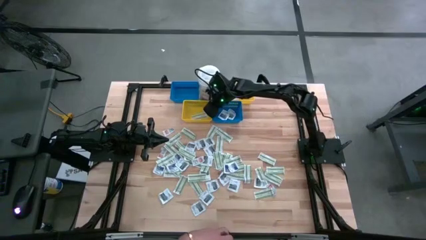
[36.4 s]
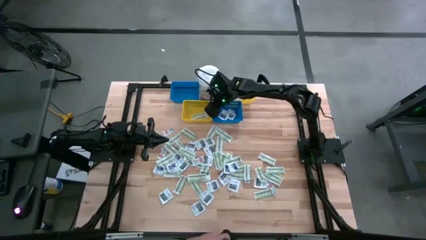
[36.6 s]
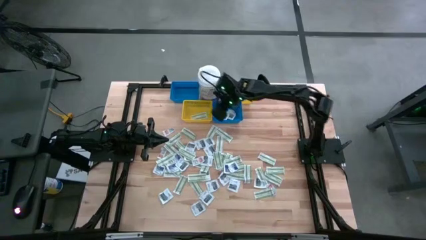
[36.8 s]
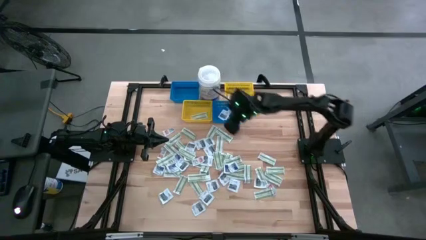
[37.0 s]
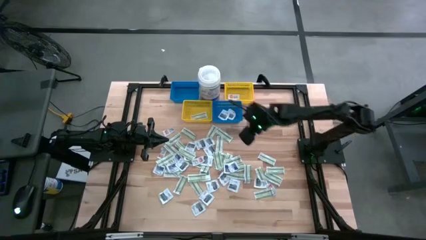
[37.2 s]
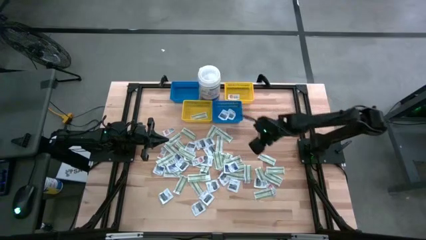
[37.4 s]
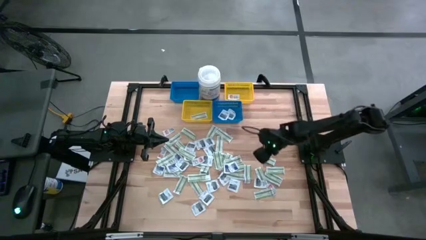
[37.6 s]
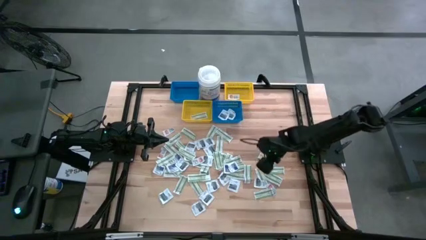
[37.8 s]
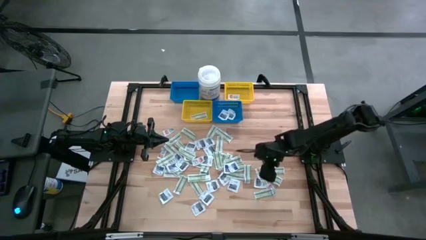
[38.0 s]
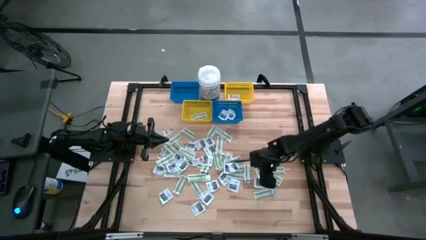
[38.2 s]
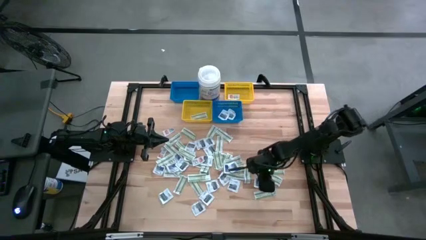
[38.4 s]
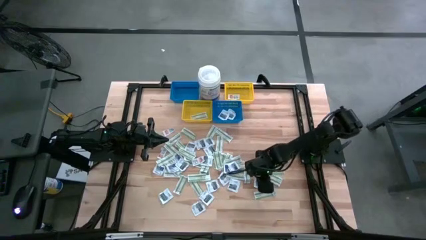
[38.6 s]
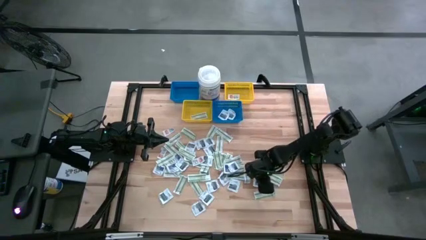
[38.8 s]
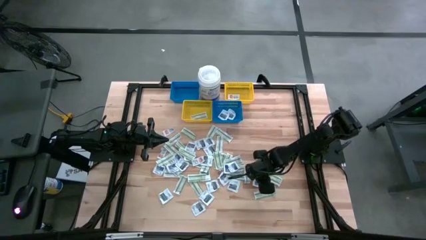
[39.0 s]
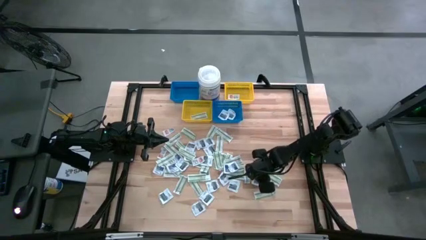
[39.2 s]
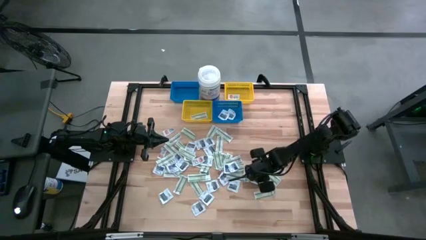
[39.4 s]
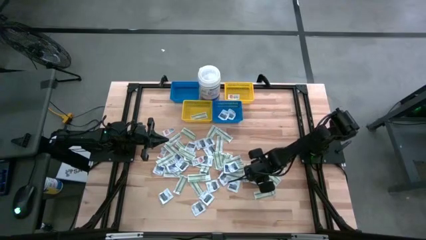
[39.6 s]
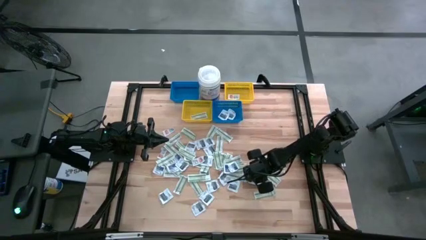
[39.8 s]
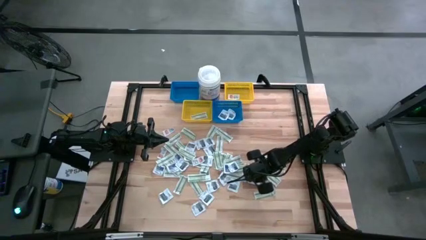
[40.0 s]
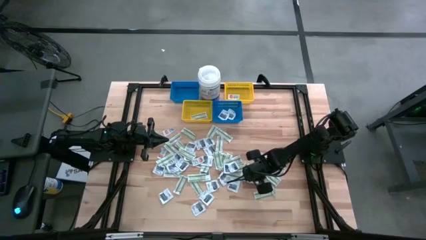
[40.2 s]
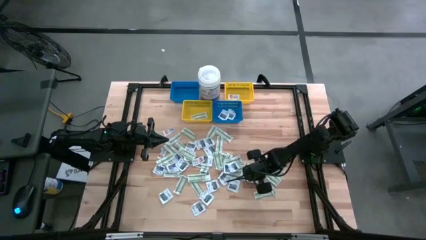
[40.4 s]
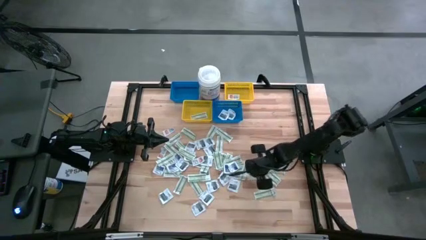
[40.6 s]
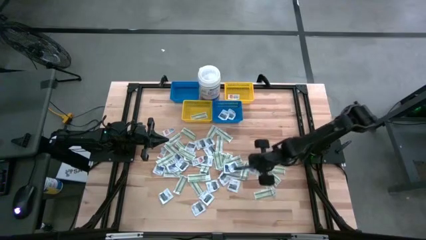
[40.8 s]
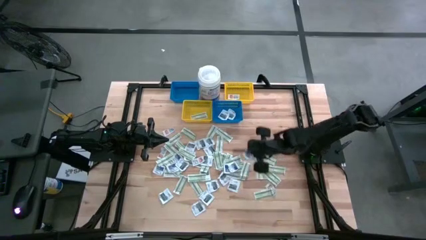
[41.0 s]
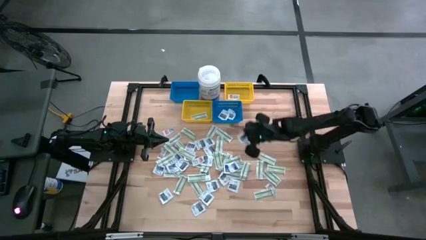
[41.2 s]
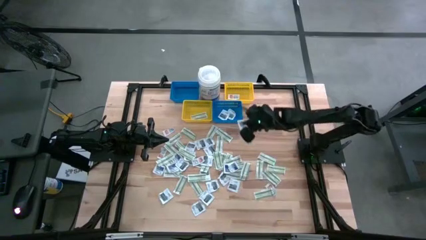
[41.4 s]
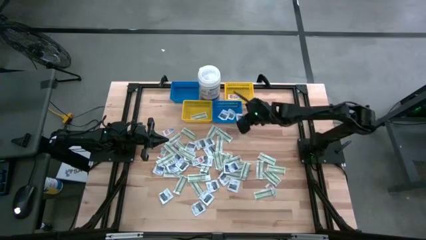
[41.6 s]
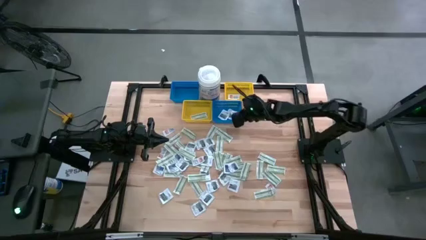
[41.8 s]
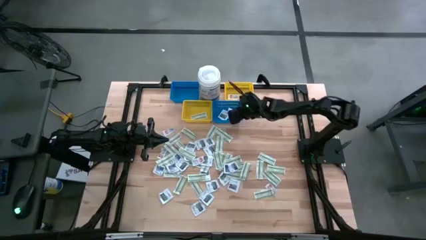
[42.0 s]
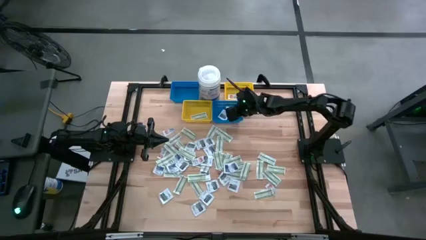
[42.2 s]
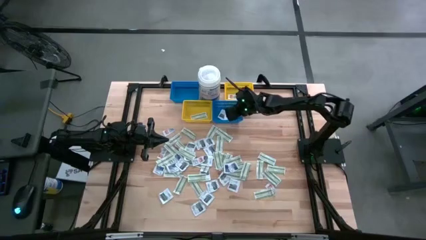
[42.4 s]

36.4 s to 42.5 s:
Task: Pick & Place First Aid Supplies
Put the black towelette pack into the right blue bin

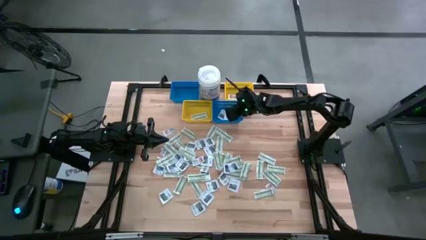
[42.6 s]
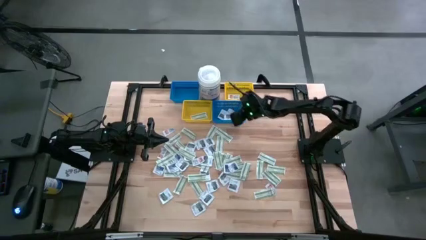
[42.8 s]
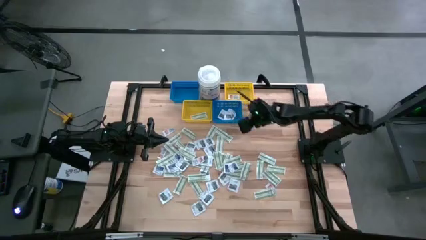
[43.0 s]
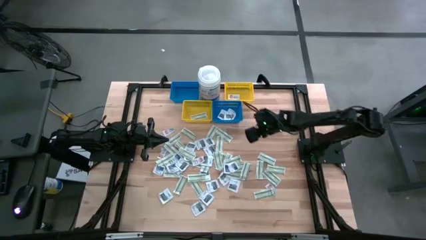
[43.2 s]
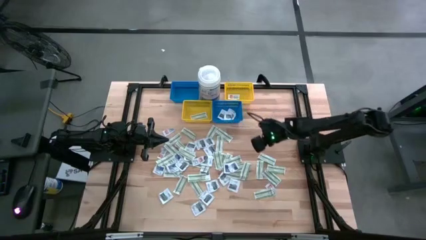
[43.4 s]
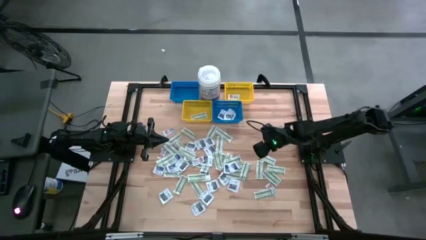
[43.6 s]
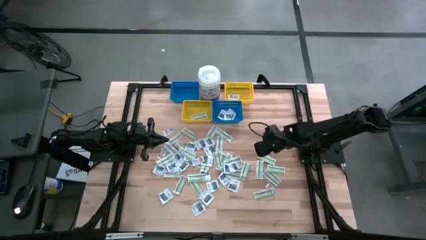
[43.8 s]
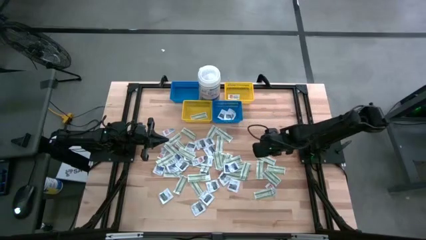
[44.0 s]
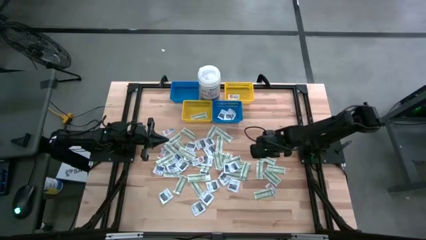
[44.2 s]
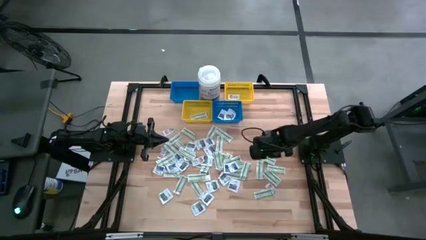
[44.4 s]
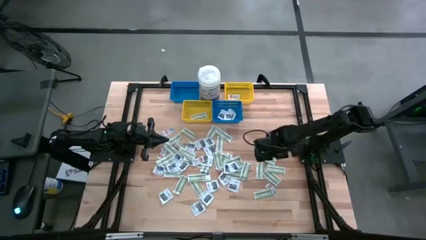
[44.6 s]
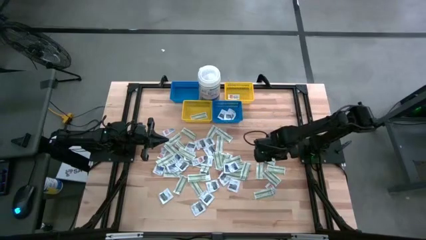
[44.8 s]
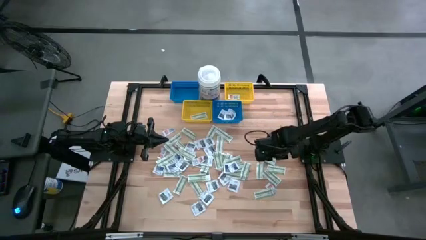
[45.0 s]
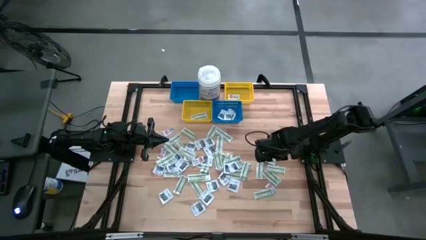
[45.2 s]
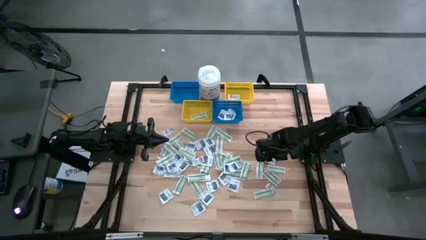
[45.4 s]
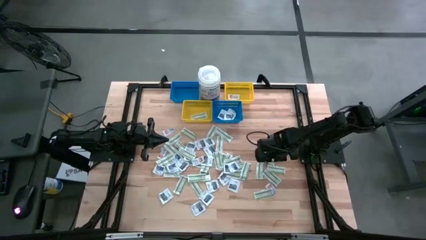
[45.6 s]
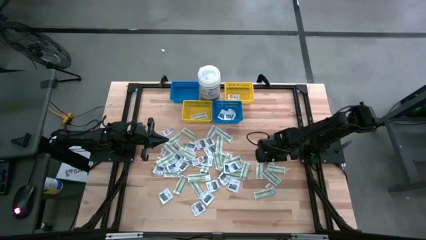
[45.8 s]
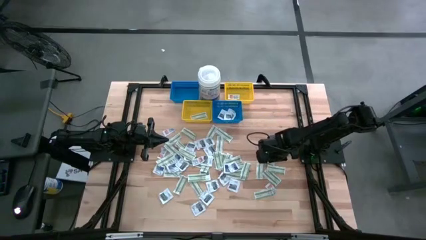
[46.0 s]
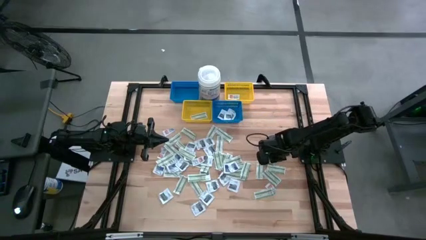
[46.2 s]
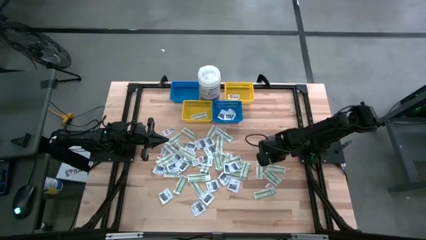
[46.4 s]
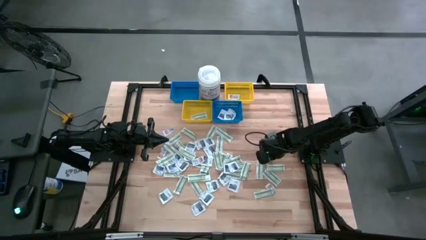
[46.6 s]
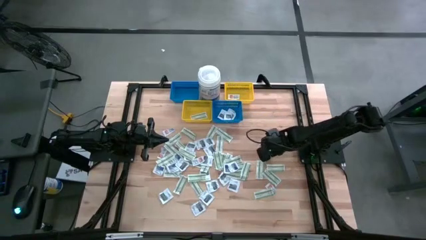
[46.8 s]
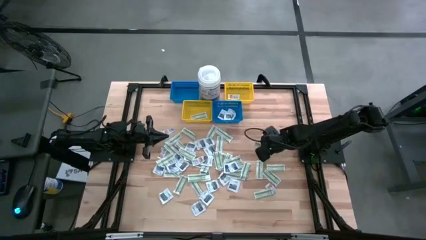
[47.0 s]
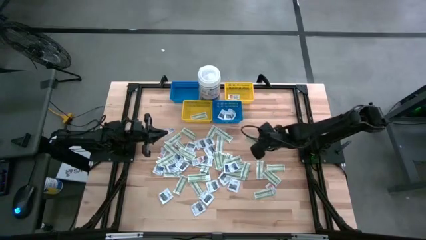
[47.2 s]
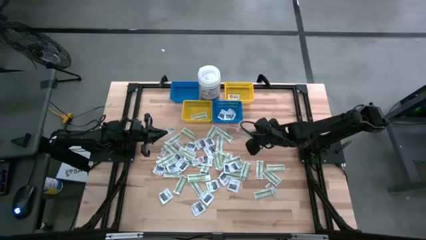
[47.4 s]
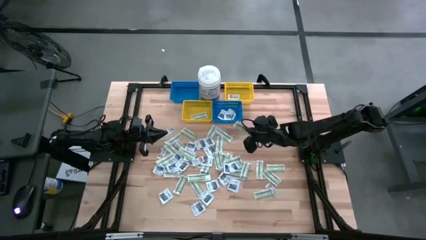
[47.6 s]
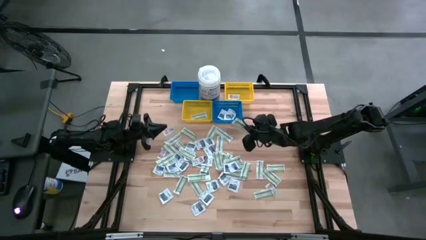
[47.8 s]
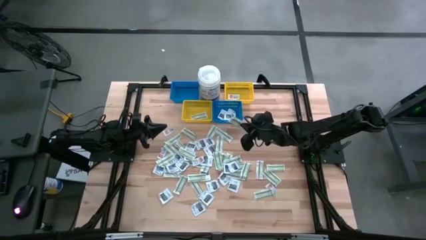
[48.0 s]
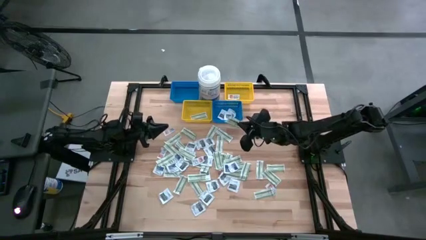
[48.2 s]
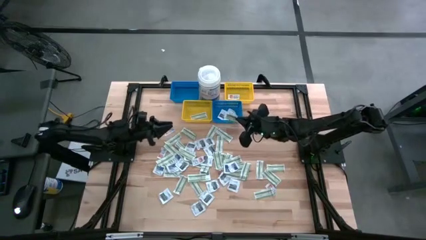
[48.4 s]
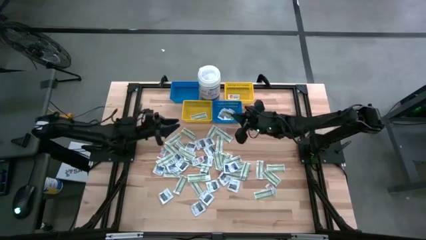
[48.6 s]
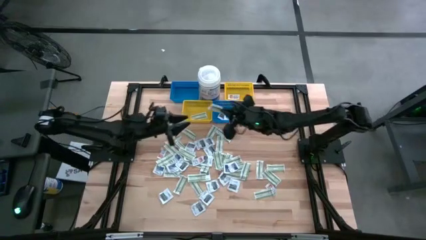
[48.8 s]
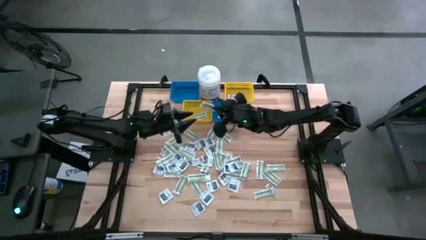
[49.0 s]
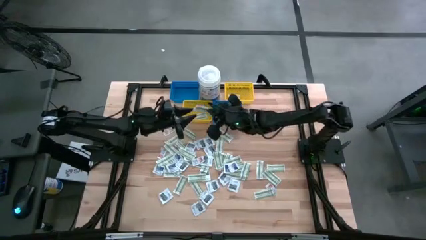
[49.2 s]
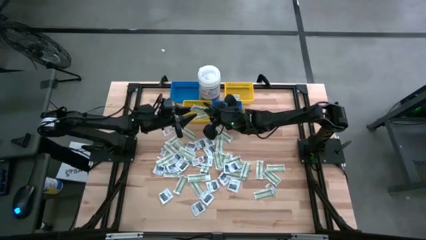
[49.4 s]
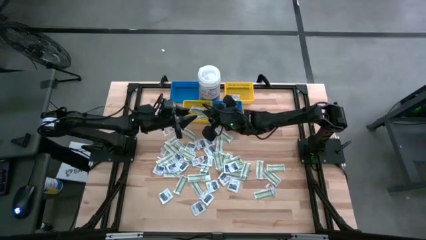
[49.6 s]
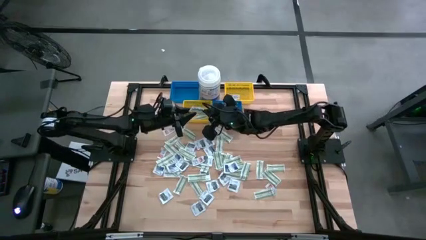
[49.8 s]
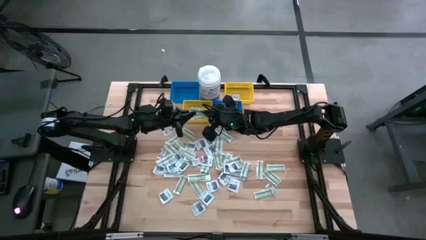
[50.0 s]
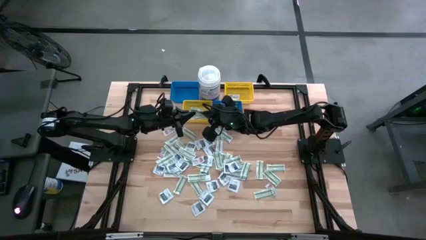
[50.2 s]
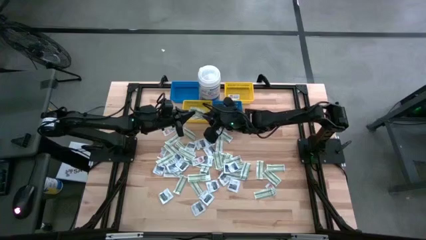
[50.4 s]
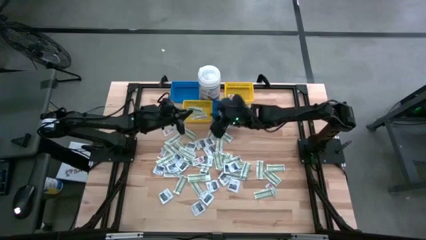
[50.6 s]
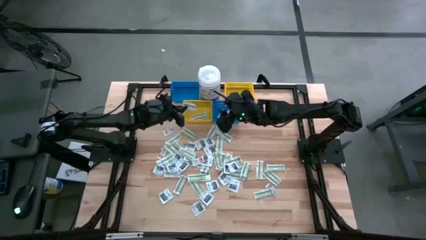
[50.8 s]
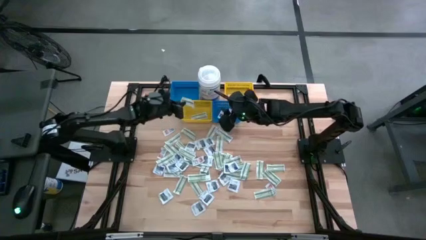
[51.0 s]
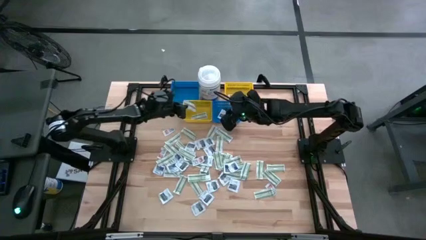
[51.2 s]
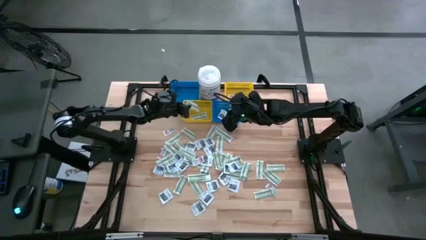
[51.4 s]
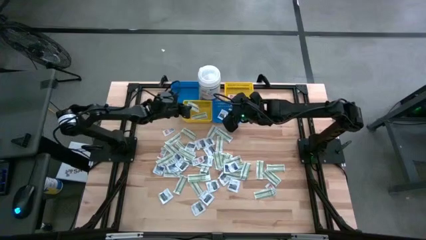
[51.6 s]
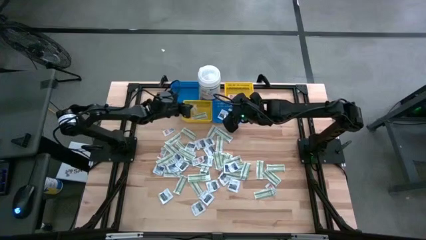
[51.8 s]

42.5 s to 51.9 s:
Put the green bandage pad into the left yellow bin
